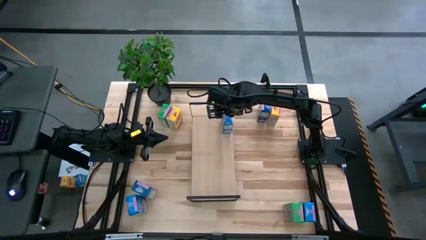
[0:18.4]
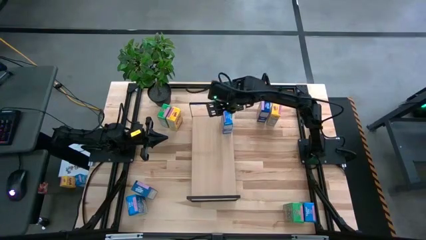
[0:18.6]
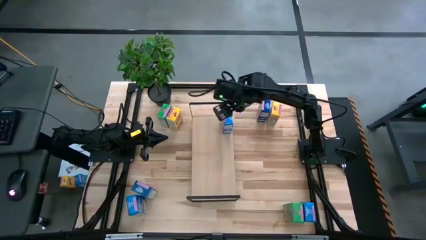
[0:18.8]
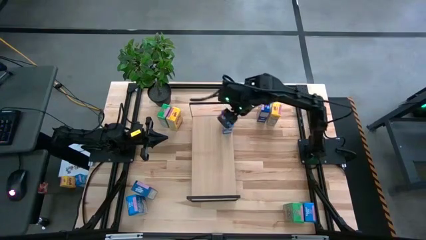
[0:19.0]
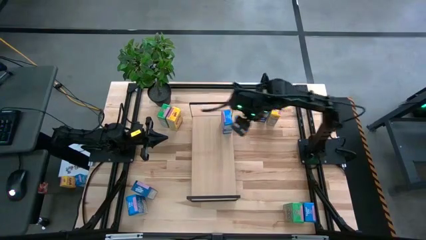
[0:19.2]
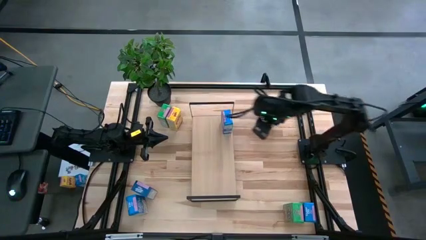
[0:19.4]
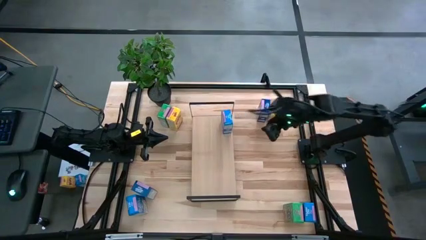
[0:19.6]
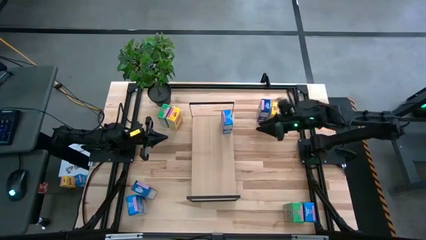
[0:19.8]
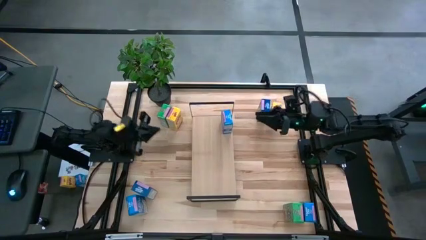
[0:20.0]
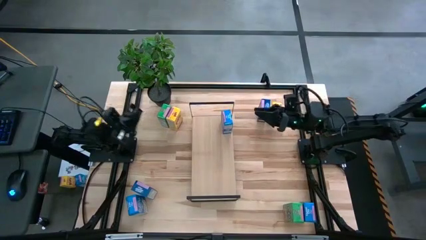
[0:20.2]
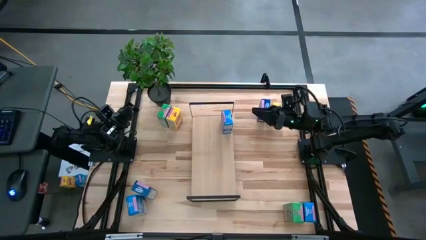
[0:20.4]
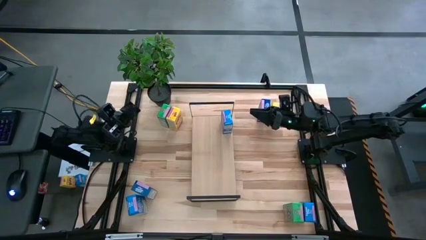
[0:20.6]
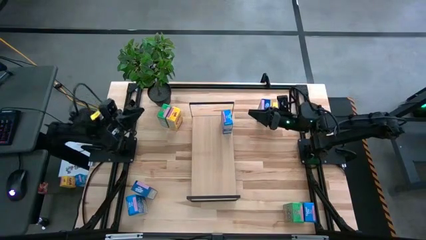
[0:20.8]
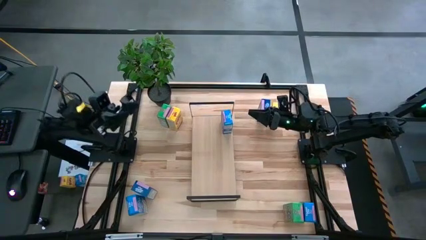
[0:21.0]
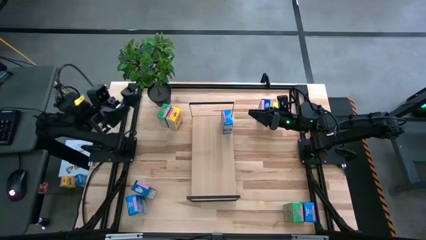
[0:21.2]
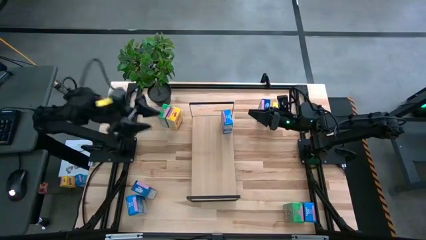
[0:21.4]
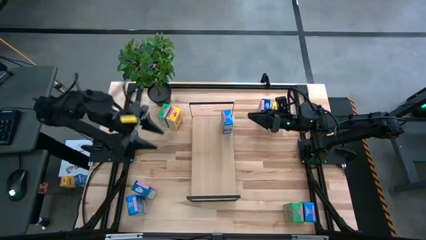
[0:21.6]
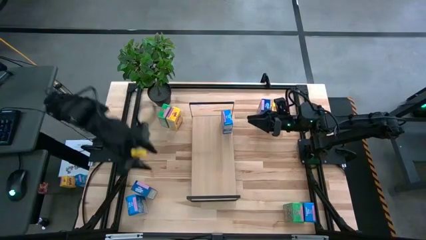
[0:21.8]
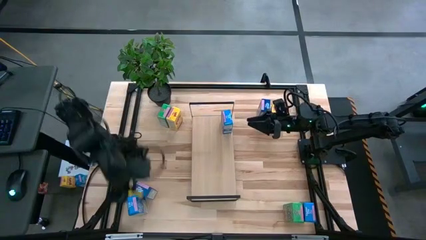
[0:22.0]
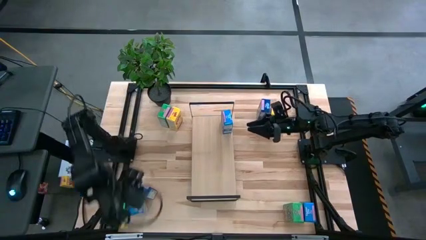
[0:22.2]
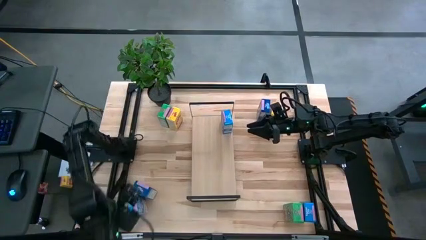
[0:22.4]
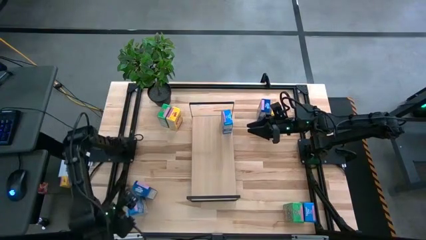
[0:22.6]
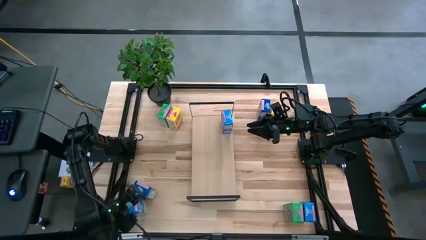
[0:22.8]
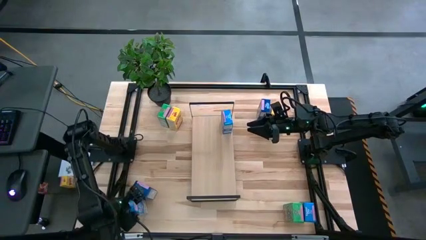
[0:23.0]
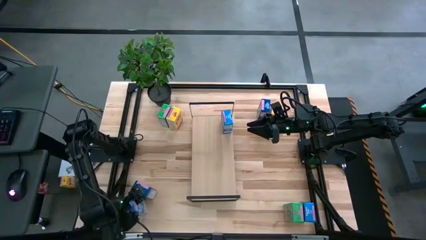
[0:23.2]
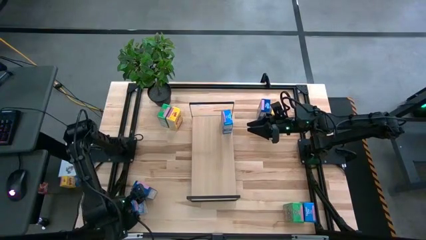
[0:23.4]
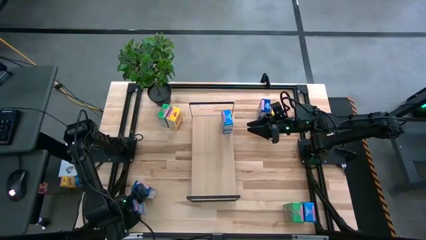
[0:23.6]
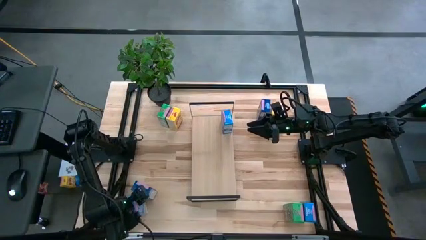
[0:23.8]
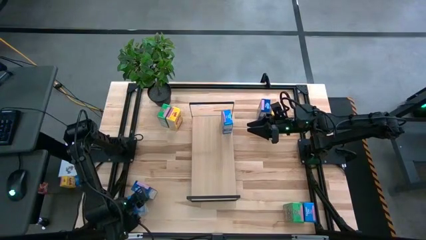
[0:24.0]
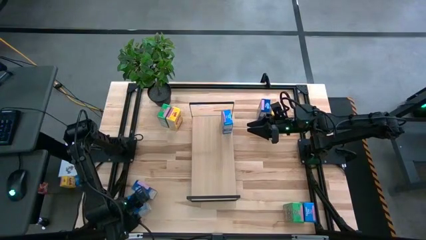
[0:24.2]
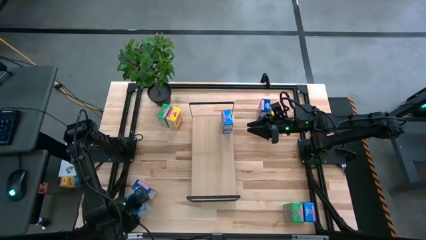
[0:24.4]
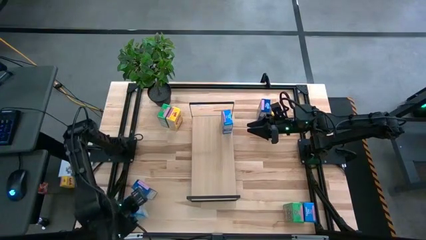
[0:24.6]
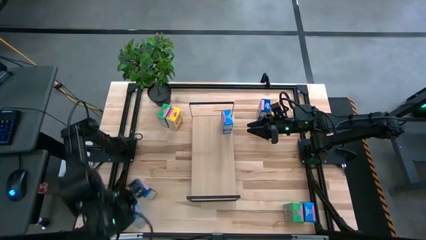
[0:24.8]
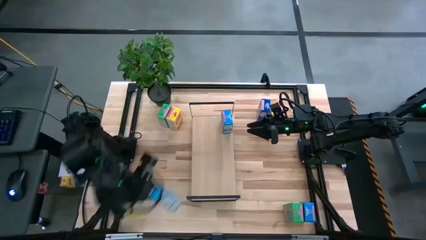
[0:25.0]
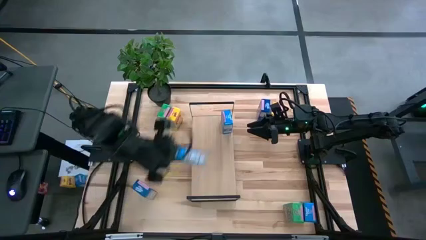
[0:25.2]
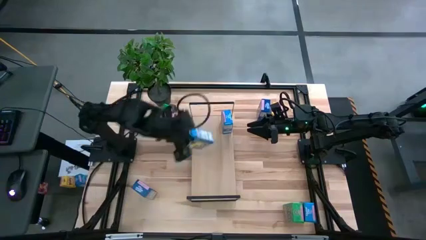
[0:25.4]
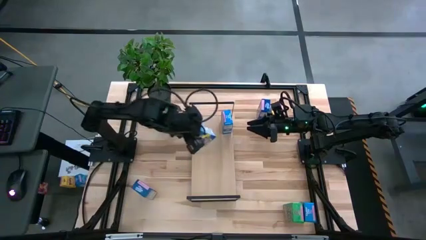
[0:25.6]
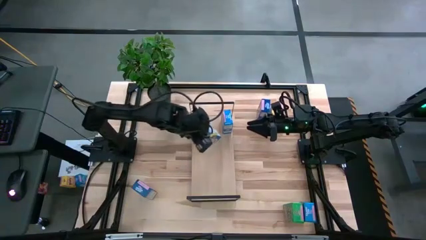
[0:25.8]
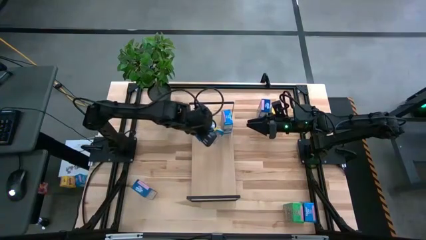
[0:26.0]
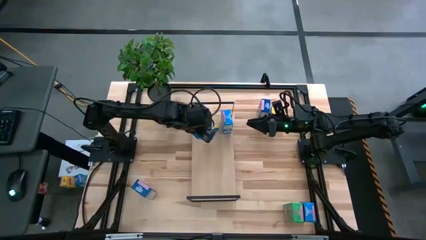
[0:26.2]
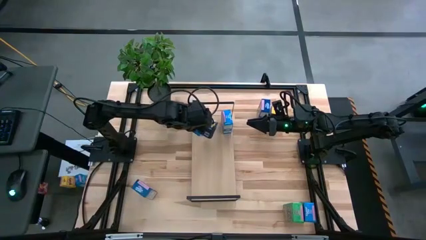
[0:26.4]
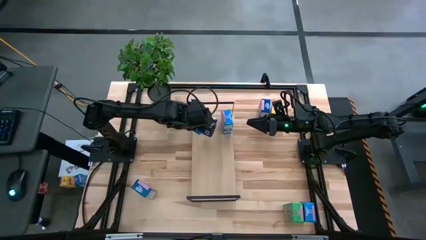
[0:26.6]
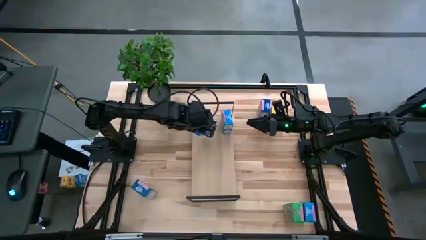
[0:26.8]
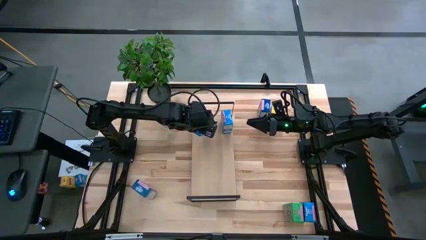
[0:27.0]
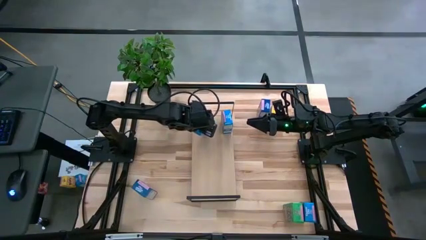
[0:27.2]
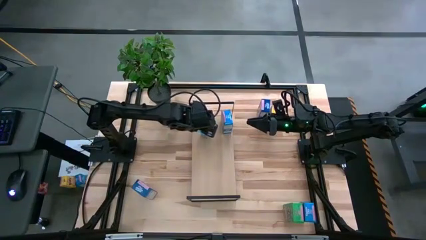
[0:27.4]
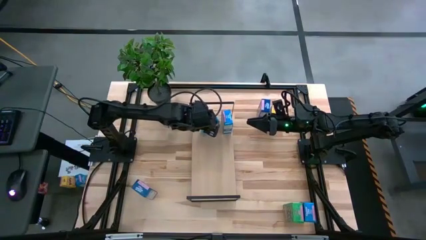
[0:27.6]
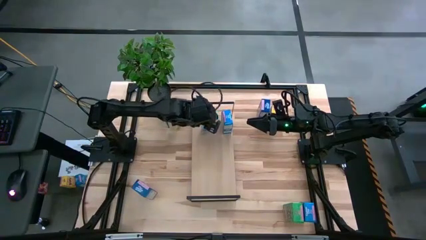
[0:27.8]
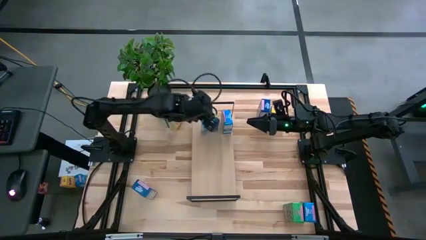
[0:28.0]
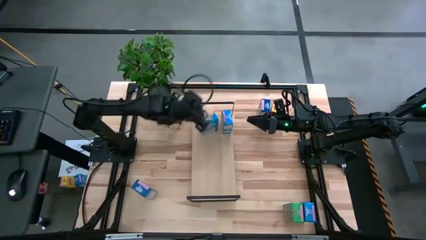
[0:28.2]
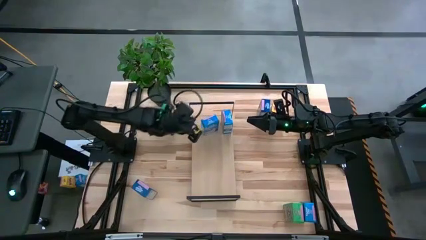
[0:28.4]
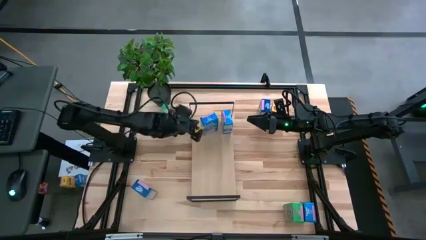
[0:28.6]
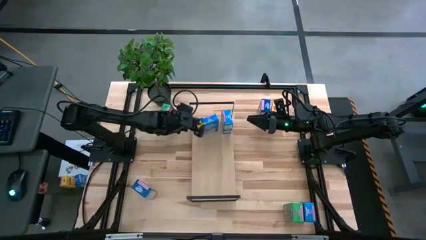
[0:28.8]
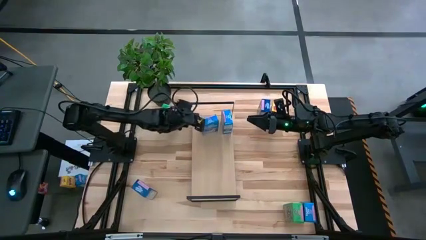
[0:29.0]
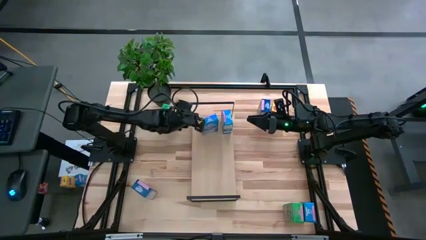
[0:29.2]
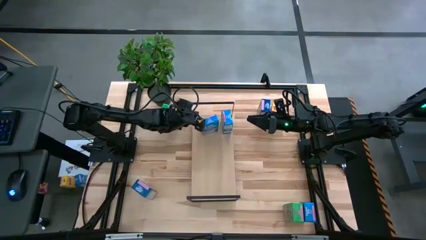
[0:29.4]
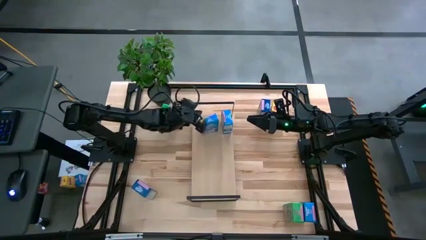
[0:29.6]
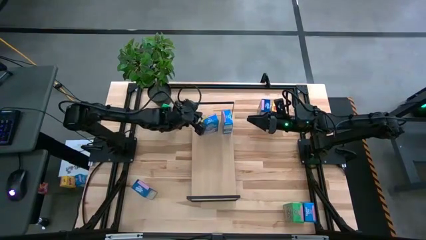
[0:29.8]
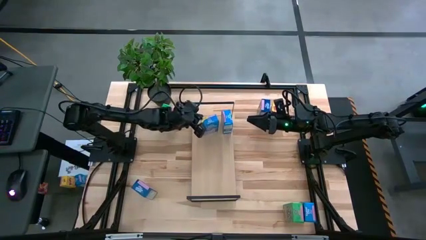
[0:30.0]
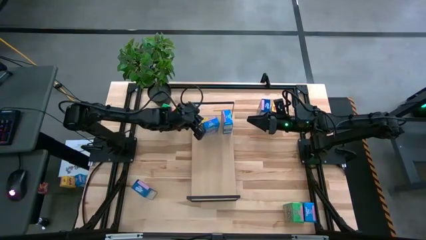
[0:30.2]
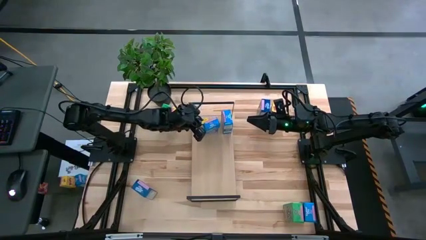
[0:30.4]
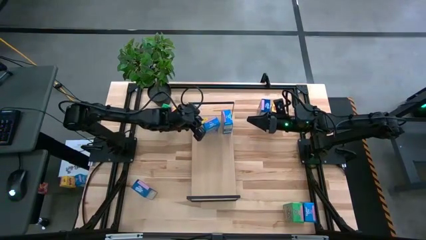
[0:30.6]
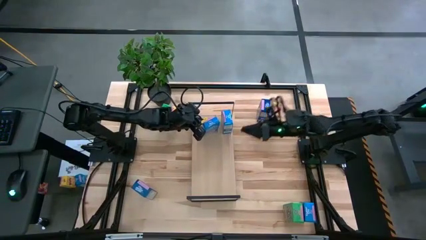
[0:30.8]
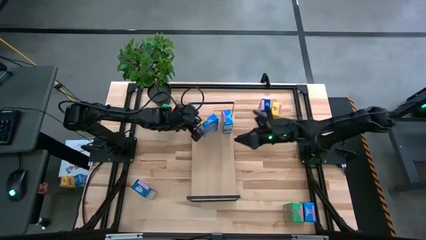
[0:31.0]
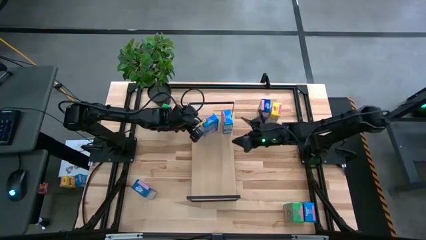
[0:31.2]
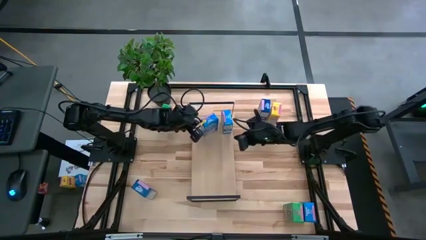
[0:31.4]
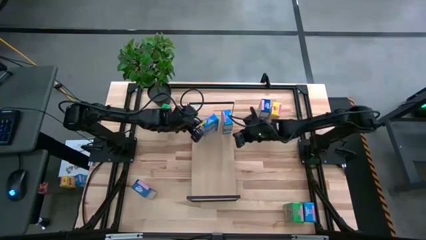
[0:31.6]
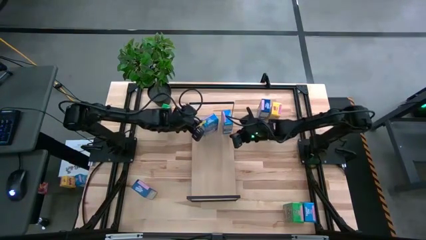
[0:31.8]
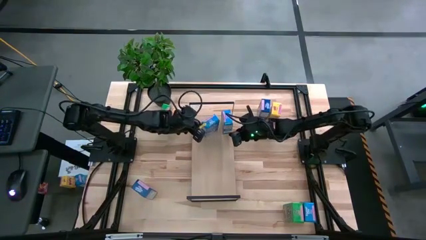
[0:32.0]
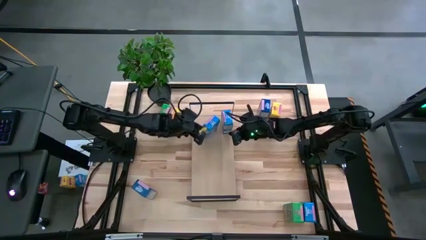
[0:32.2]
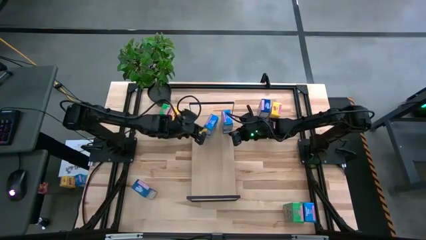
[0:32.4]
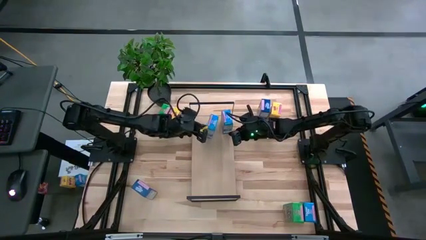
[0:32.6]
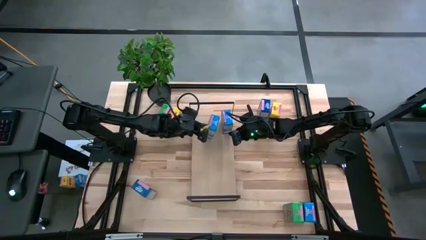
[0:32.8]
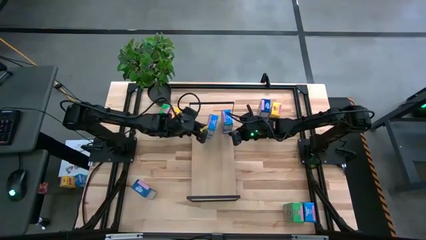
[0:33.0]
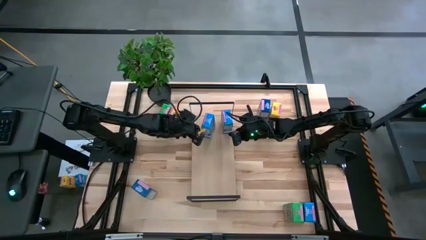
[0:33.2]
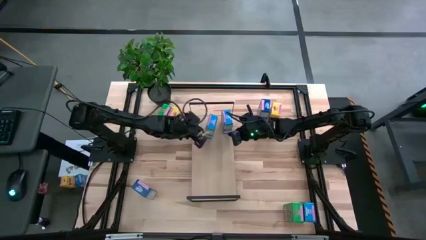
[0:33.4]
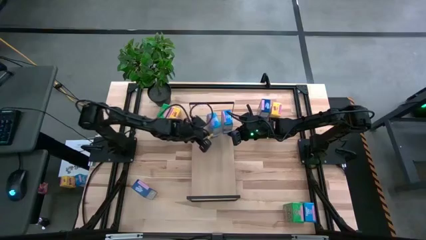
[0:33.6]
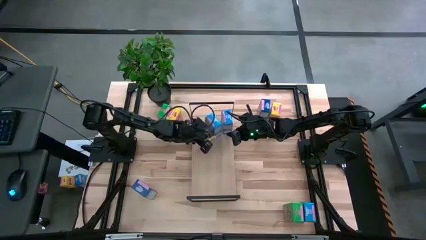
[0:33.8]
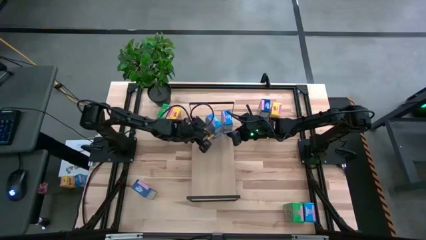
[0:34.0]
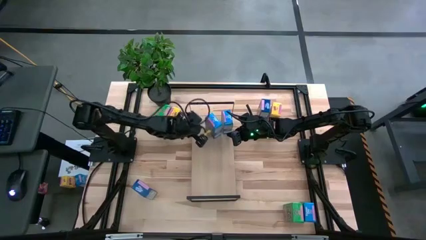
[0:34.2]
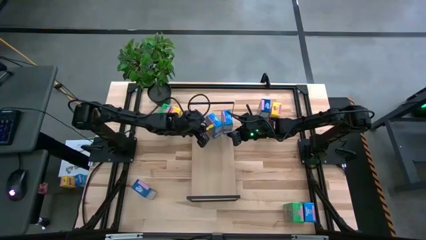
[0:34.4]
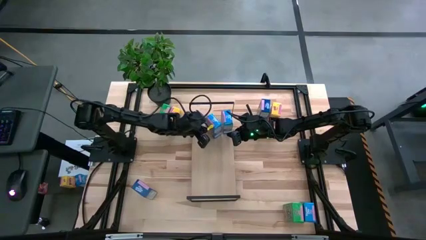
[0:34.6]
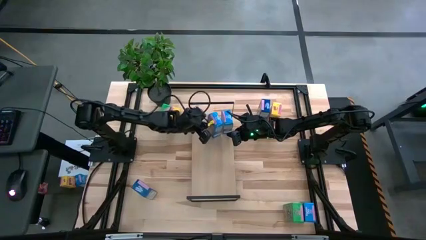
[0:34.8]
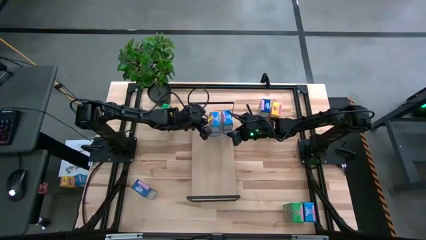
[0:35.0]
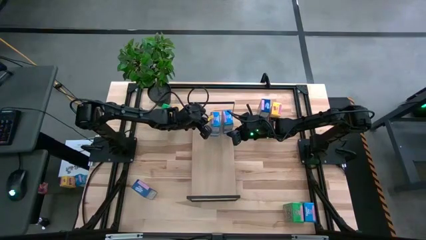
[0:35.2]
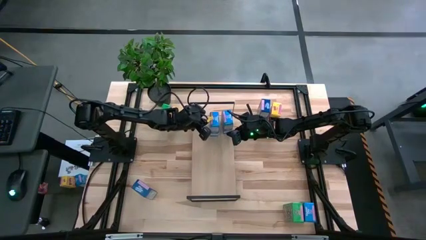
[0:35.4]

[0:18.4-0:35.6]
Task: Stack cereal on shelf
Put the left light blue cereal box on the shelf aligned with the other light blue cereal box
